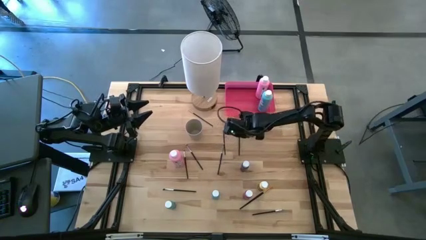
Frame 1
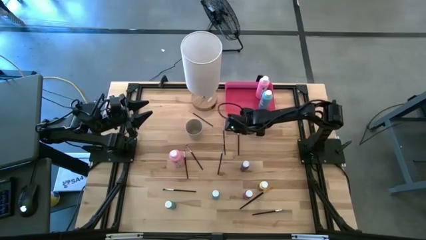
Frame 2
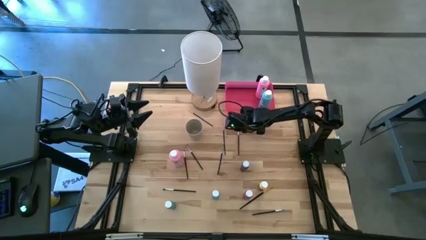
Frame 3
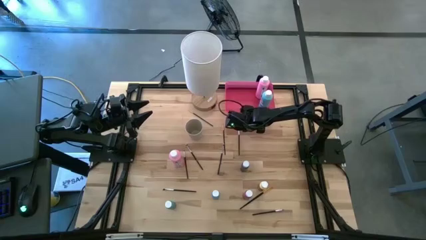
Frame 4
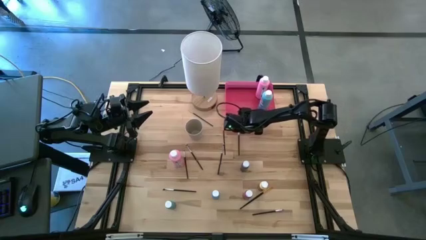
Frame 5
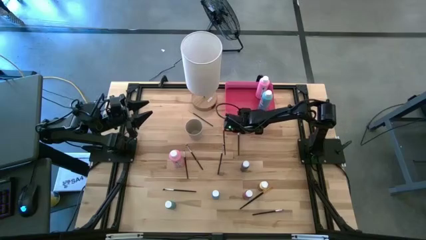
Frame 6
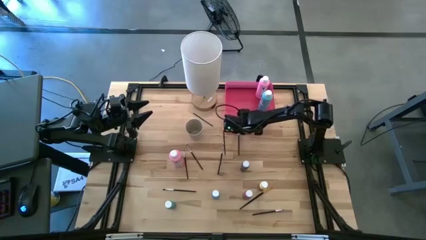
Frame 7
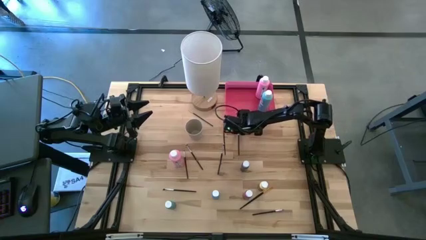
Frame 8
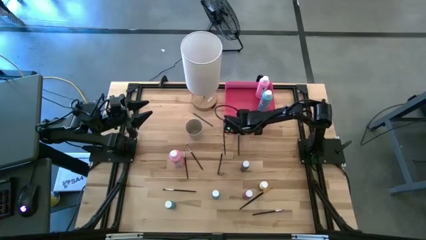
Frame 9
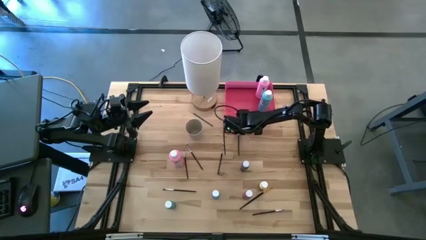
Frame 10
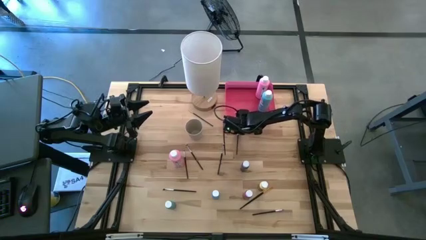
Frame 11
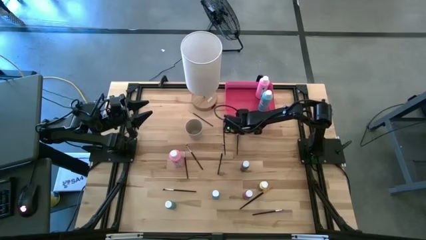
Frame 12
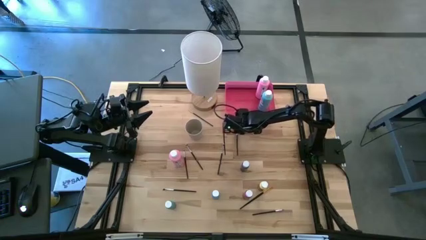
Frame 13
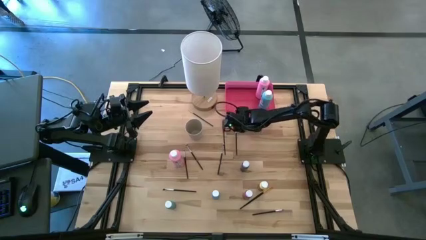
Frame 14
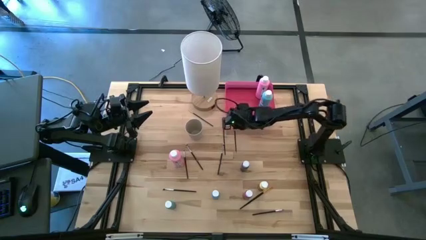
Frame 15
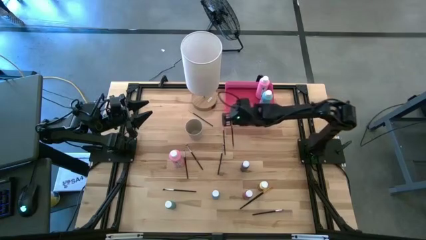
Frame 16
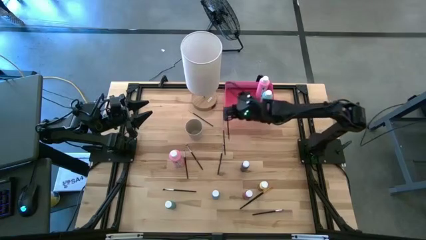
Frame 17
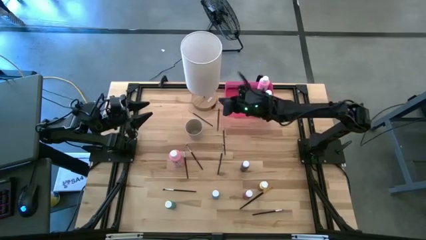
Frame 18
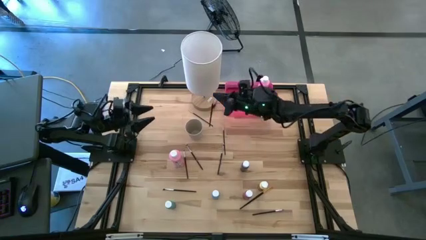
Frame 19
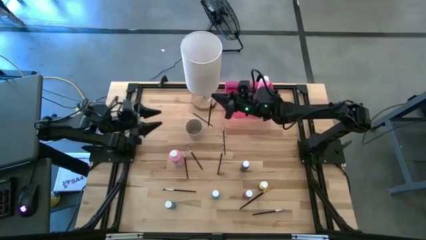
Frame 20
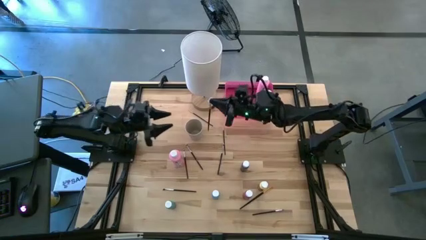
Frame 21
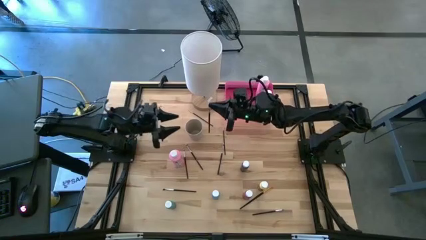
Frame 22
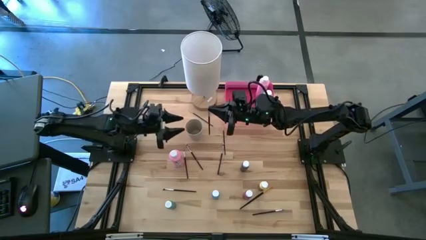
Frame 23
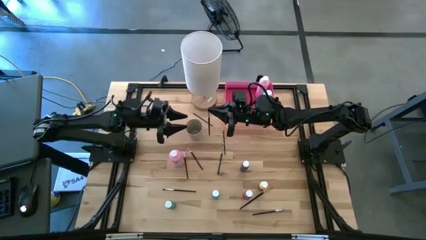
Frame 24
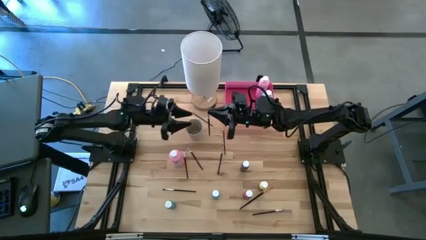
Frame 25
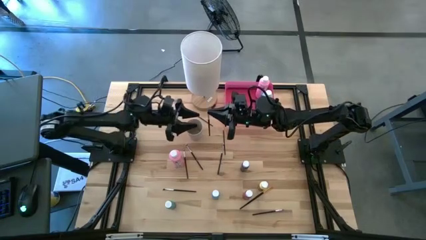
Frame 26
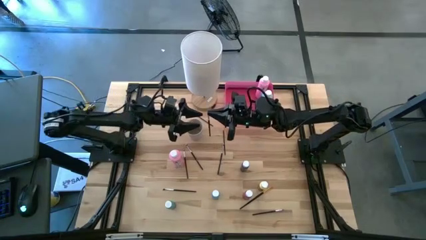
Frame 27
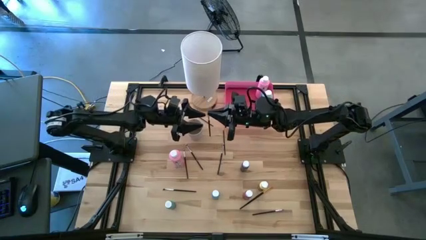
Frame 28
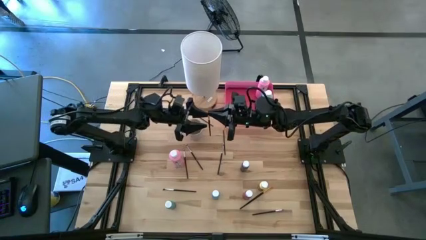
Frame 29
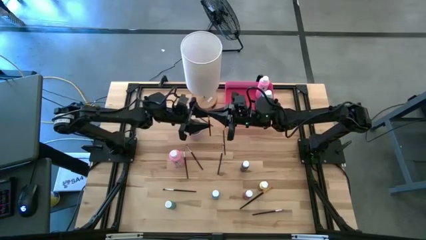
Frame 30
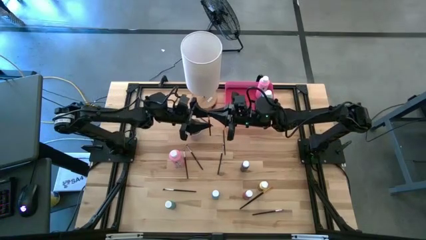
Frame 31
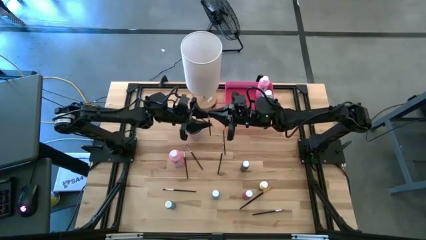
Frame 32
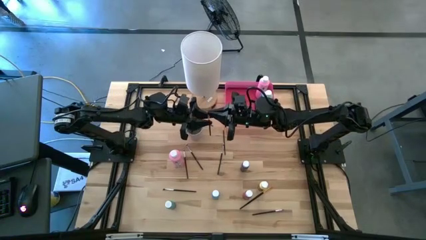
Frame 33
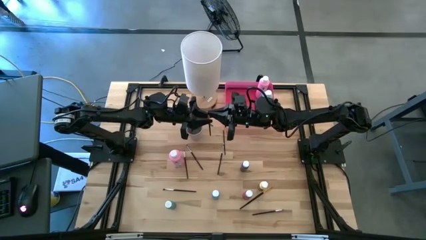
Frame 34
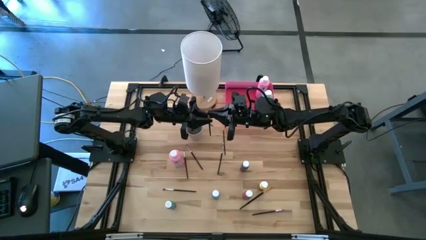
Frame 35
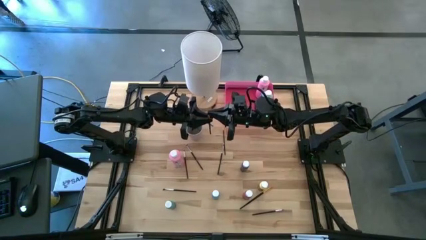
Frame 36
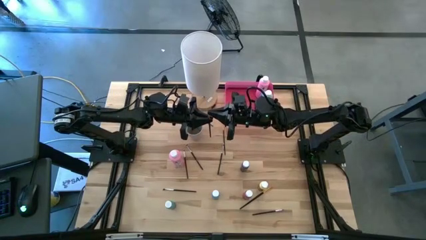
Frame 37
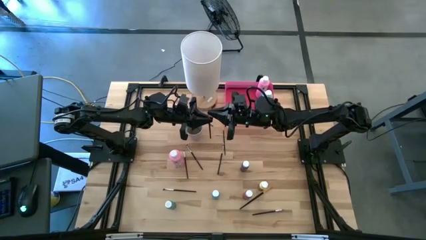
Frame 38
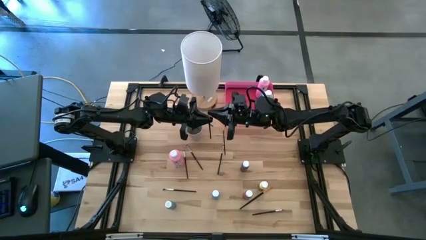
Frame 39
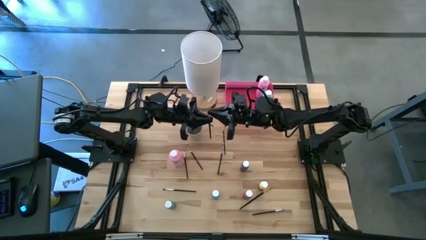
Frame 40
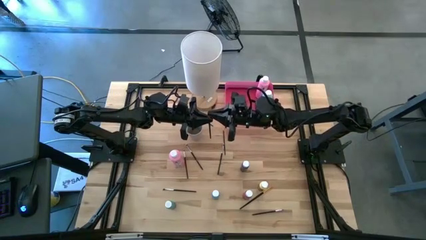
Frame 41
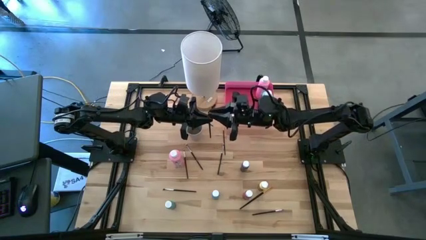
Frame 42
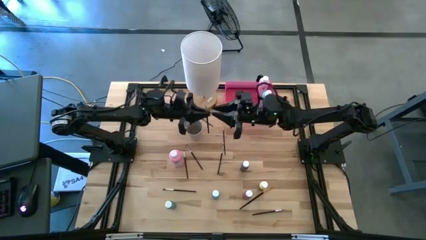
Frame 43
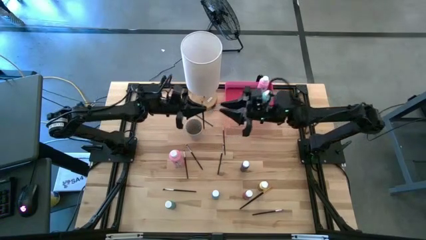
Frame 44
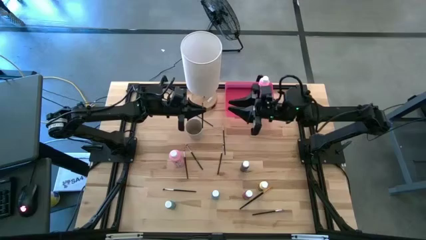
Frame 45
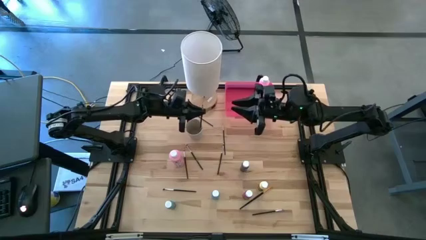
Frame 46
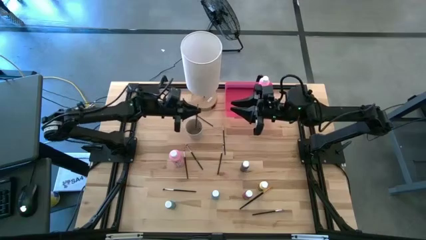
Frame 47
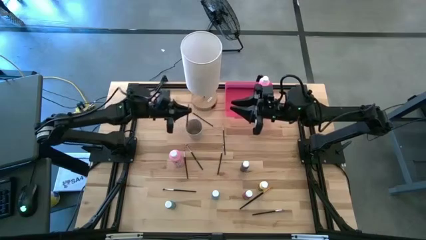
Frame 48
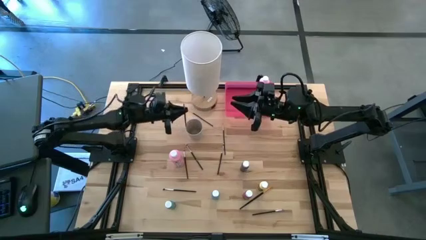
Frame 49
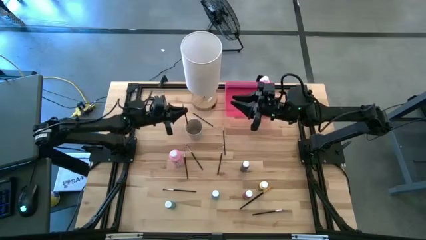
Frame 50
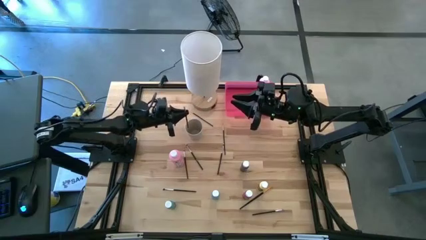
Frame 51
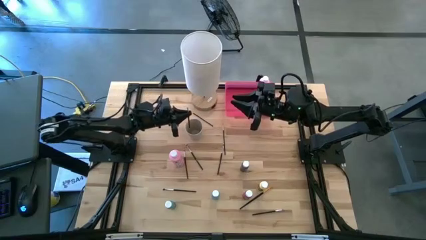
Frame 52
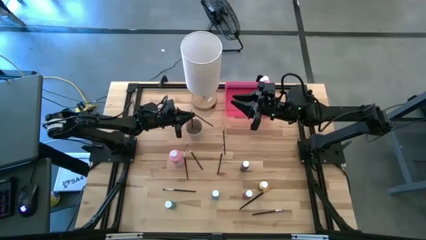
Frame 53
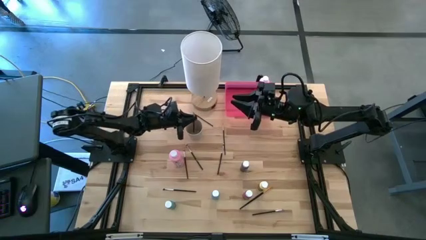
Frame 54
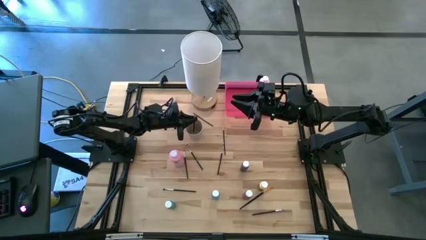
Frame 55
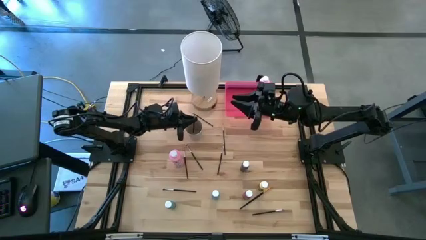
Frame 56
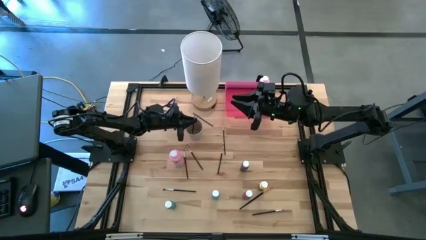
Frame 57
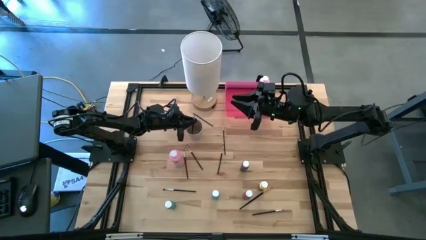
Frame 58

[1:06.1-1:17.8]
Task: Pick & Place Paint Supplies
Put the silver eyeshadow brush into the white cup
